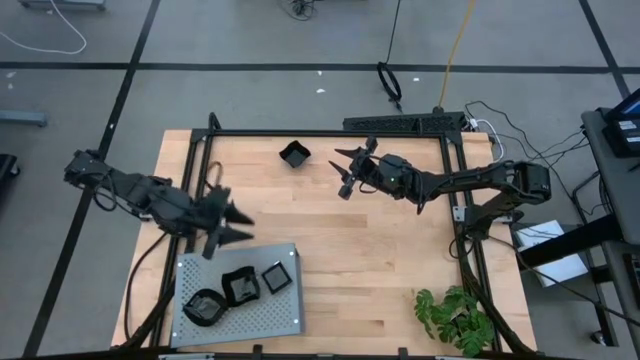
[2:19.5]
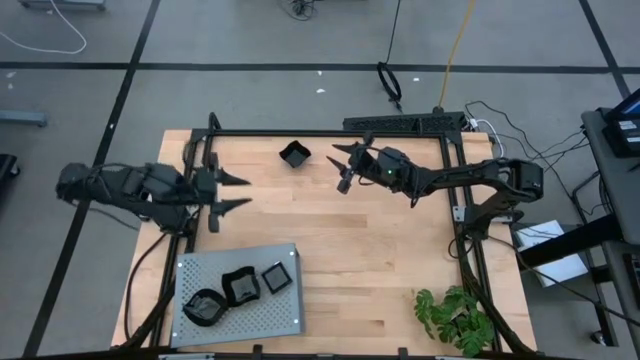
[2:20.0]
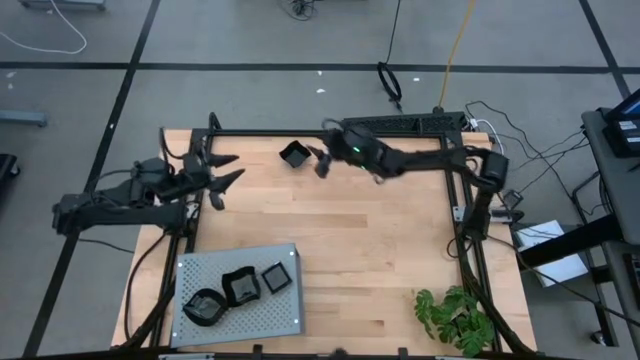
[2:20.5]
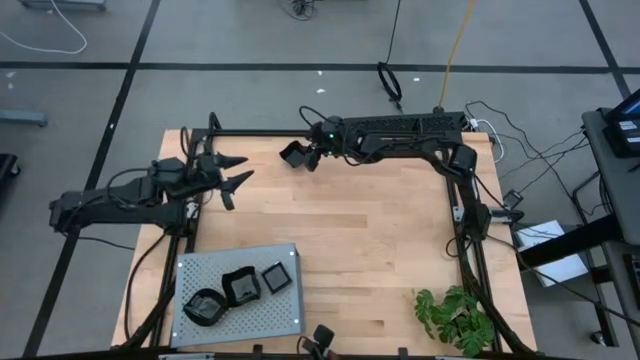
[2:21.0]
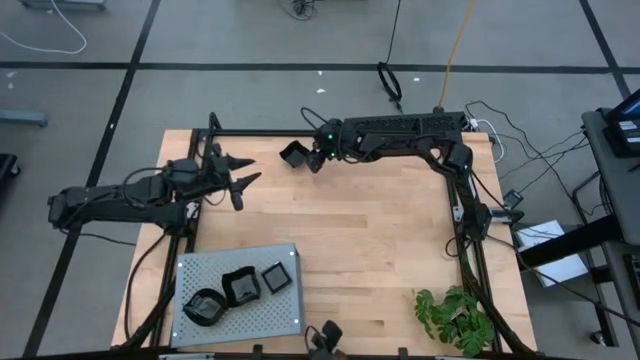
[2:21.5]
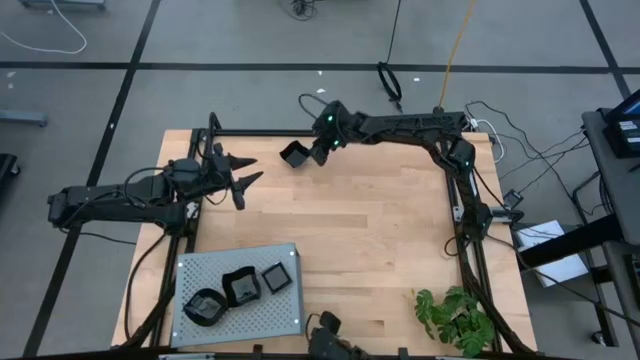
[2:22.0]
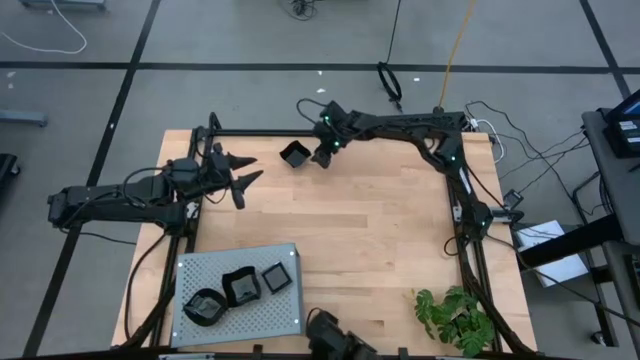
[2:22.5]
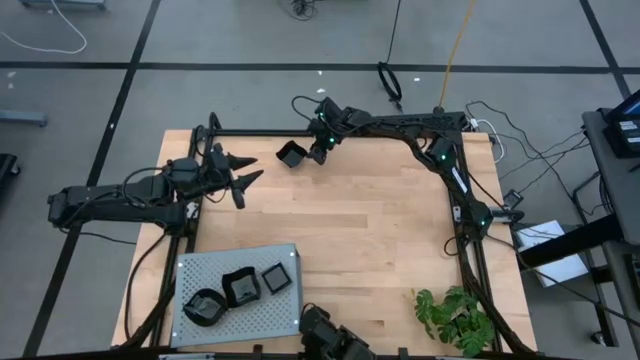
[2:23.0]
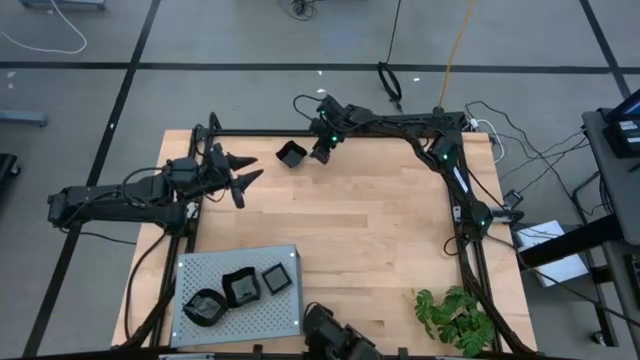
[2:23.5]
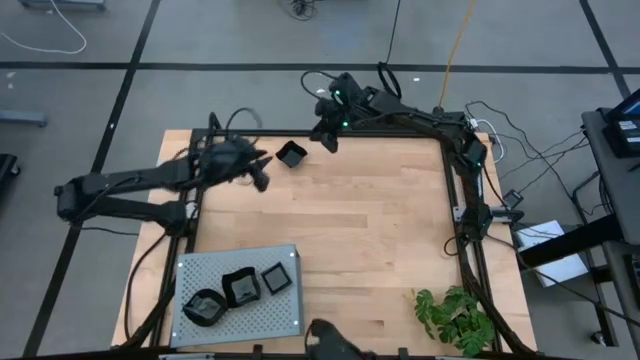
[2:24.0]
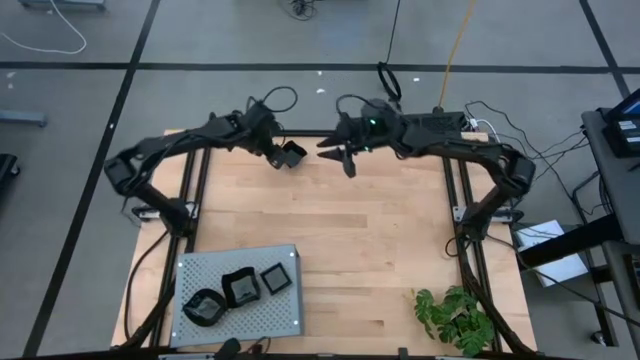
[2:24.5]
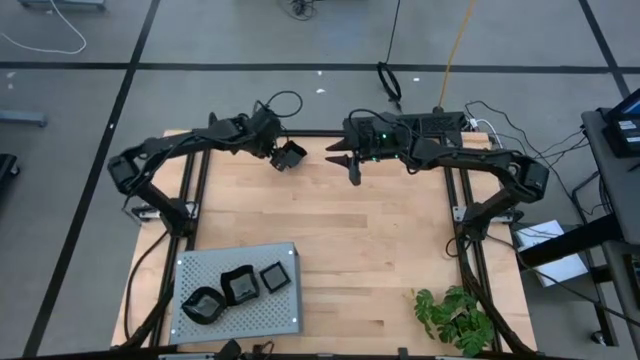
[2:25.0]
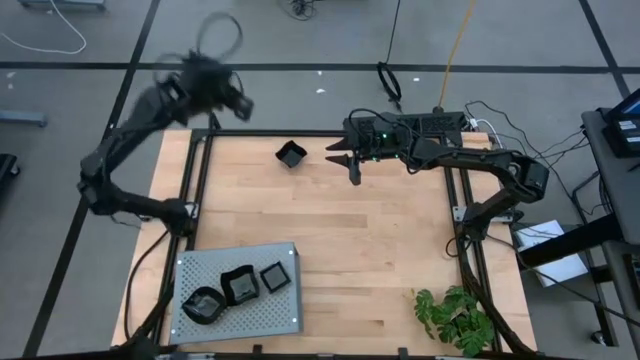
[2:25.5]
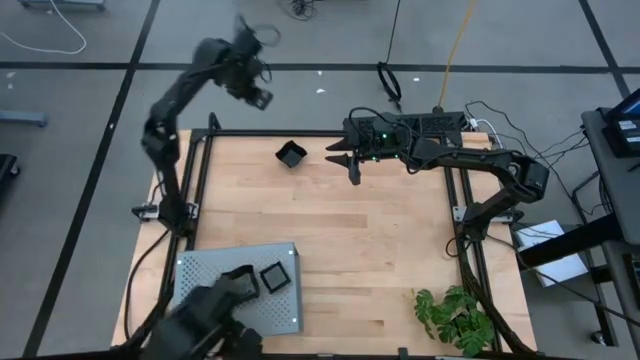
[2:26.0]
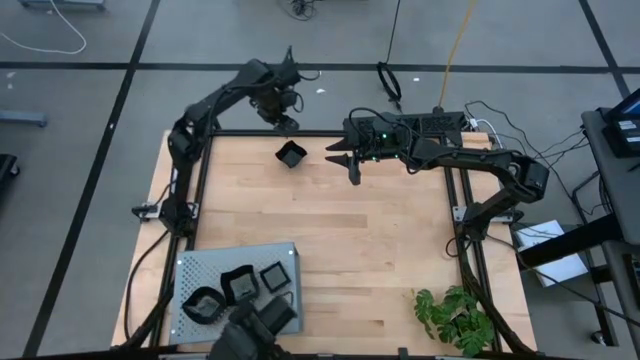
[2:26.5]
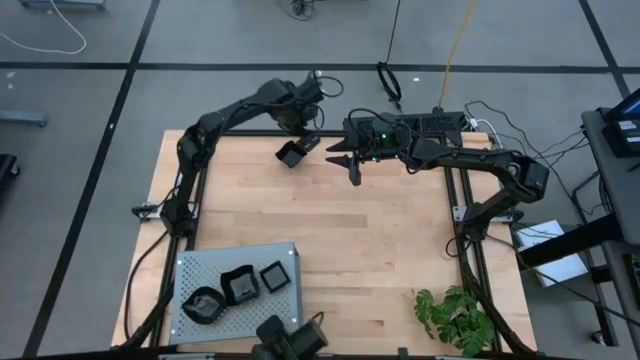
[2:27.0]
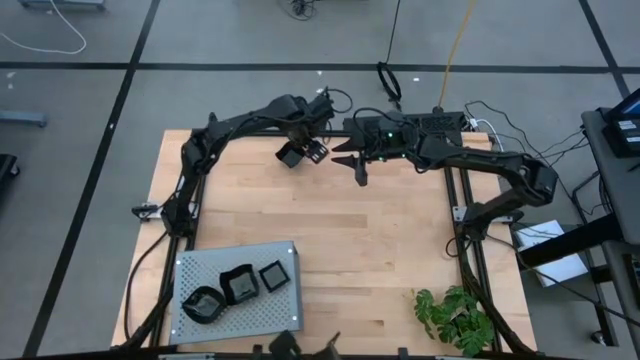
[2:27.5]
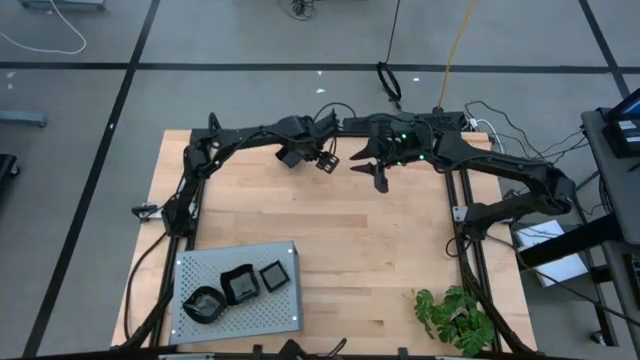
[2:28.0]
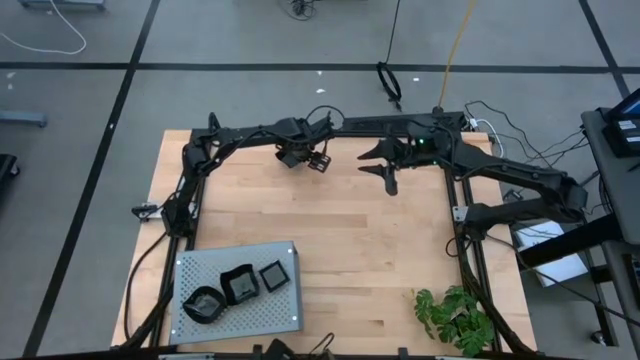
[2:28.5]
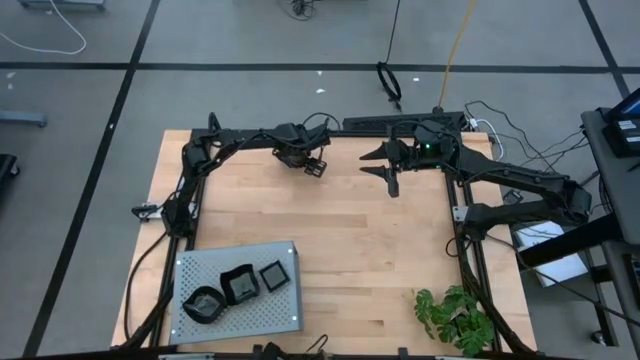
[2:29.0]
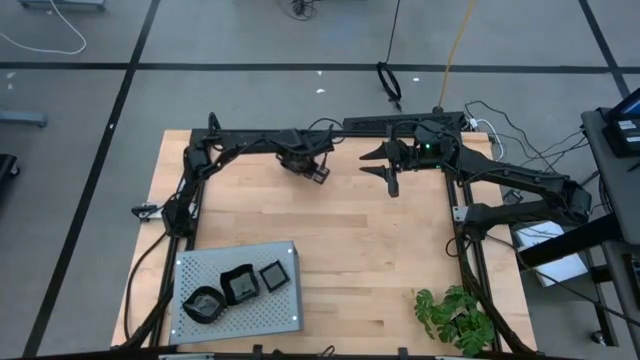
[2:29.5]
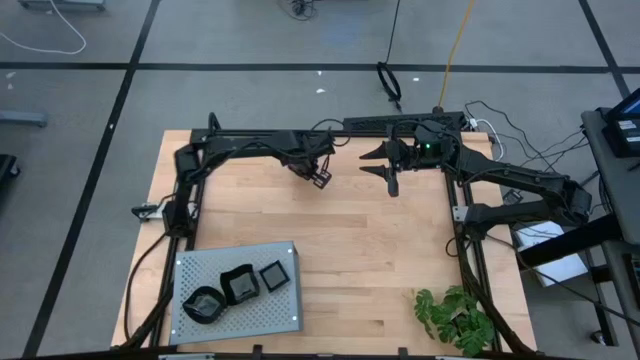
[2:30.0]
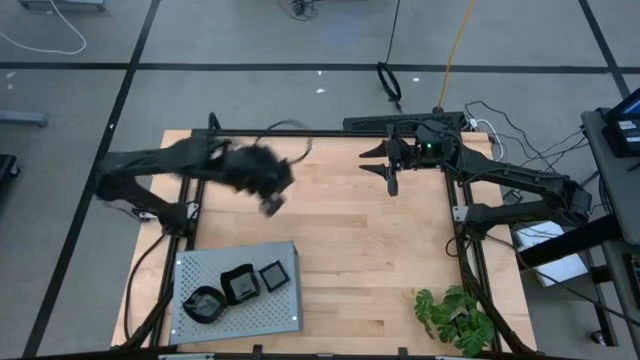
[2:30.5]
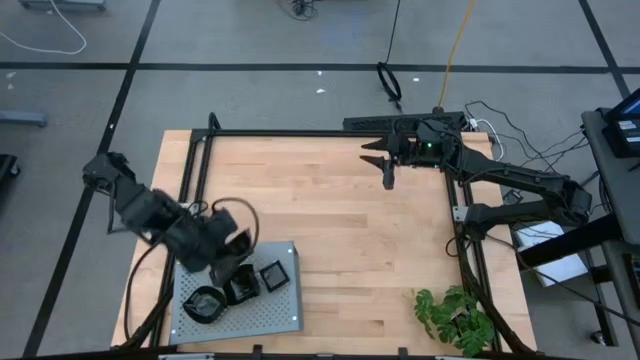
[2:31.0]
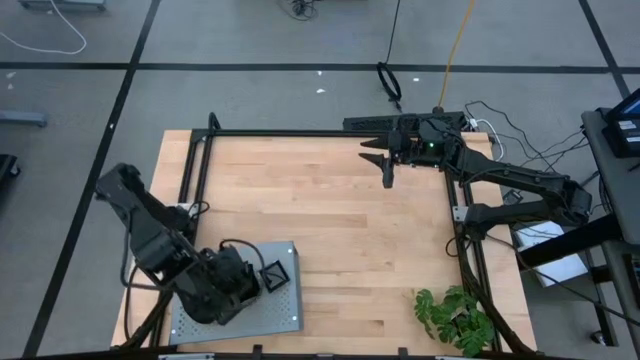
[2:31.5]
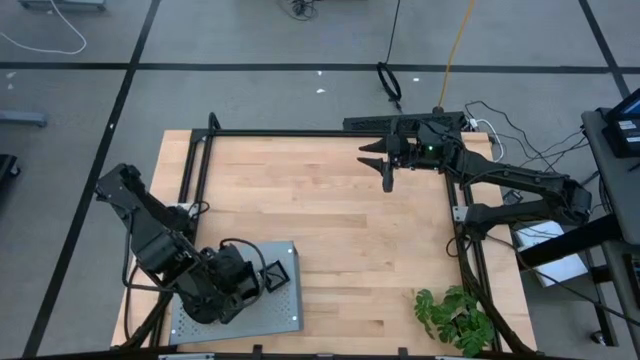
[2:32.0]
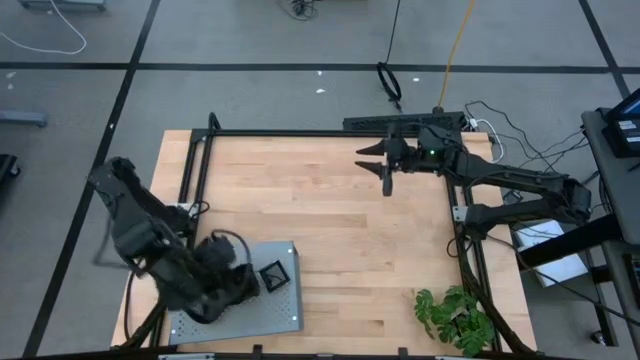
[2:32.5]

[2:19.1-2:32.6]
Task: Pick & Place Mini shaped plates
Stack the distorted square plate on top of the other distorted square plate on the shelf

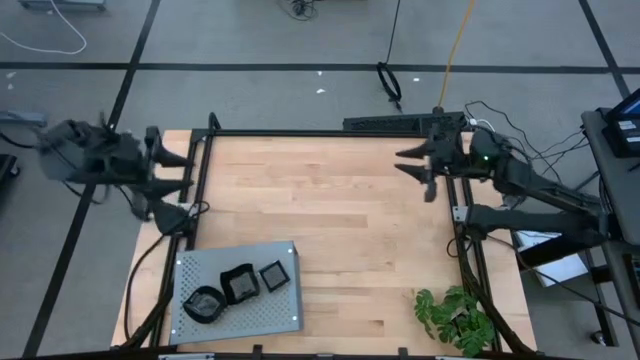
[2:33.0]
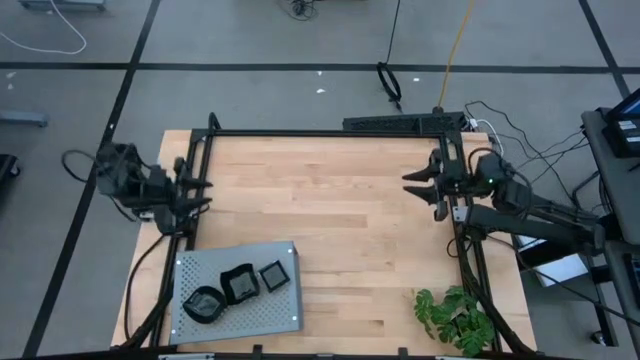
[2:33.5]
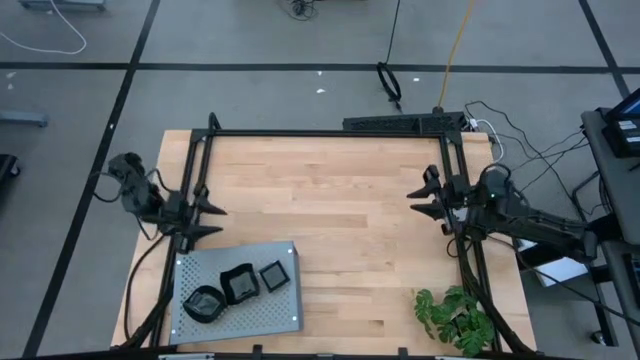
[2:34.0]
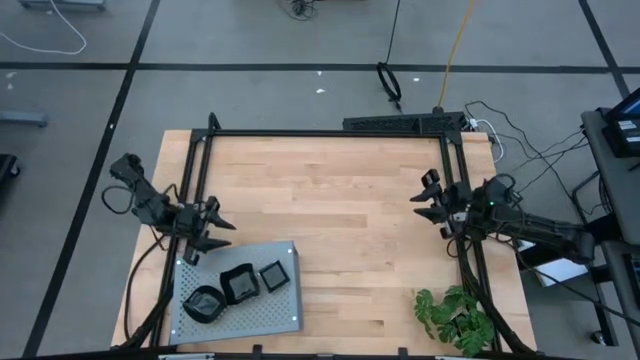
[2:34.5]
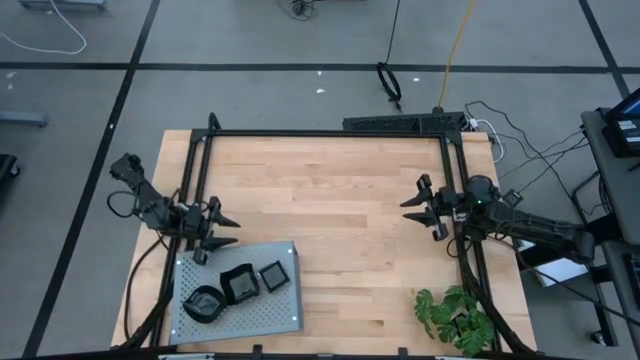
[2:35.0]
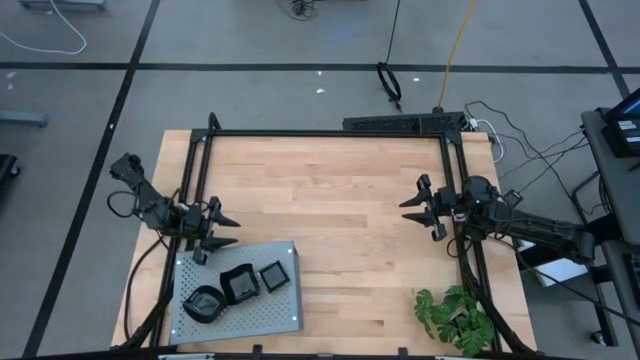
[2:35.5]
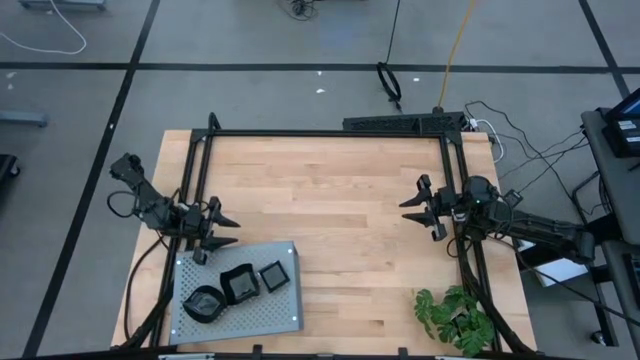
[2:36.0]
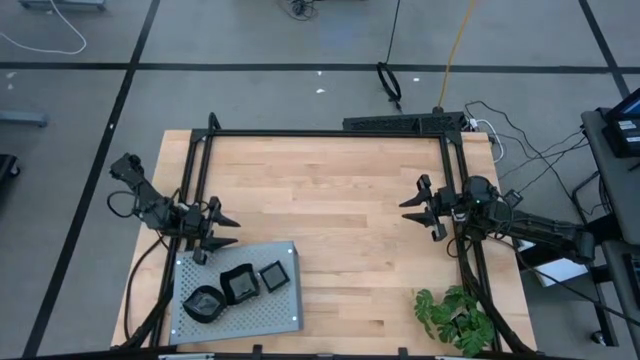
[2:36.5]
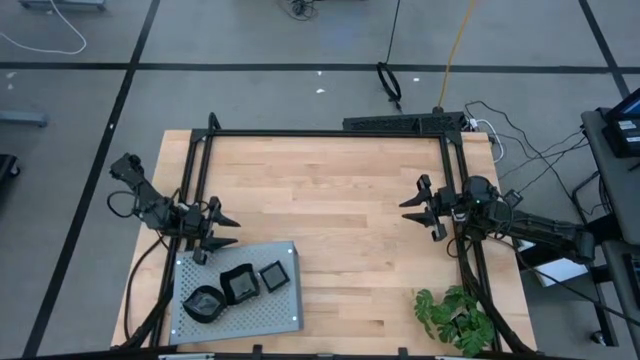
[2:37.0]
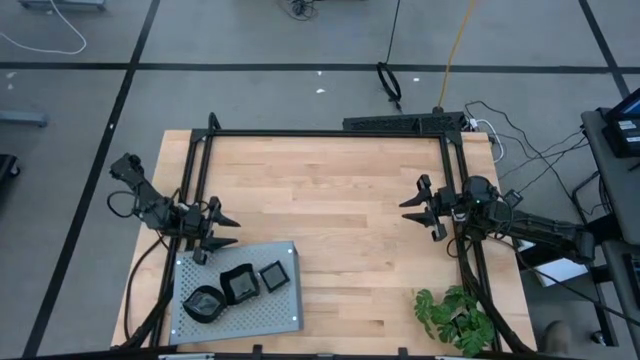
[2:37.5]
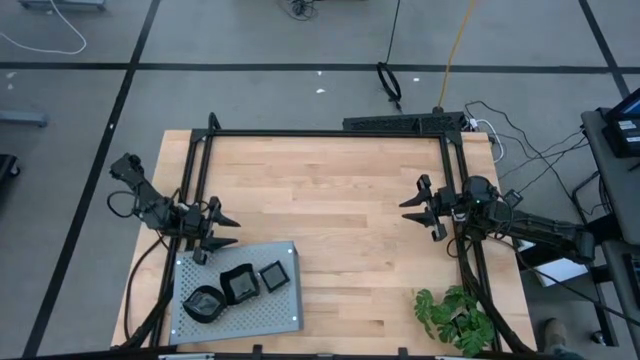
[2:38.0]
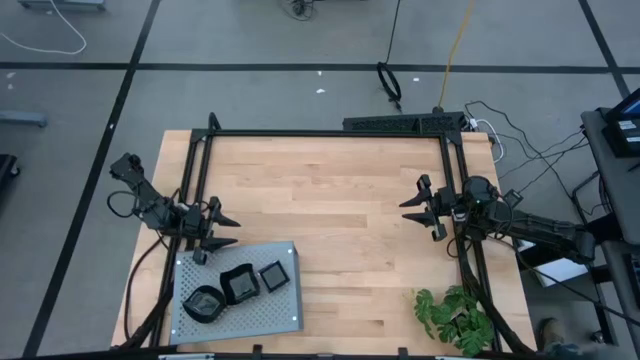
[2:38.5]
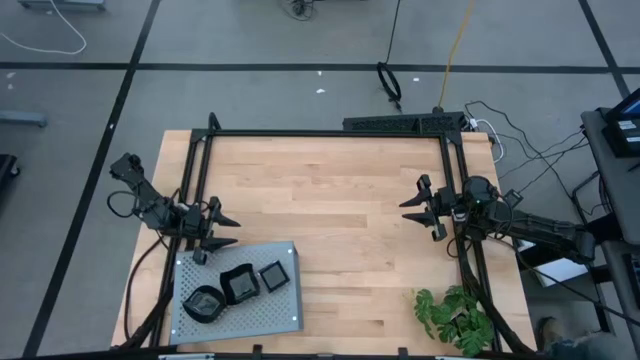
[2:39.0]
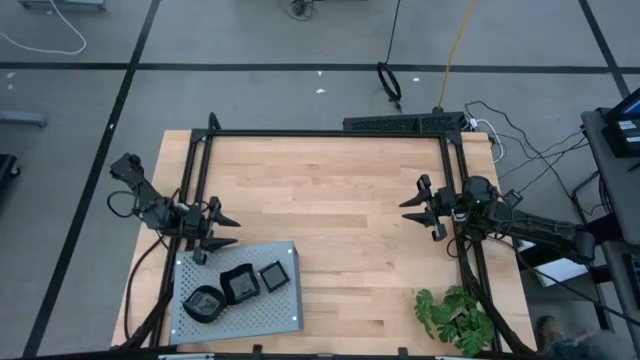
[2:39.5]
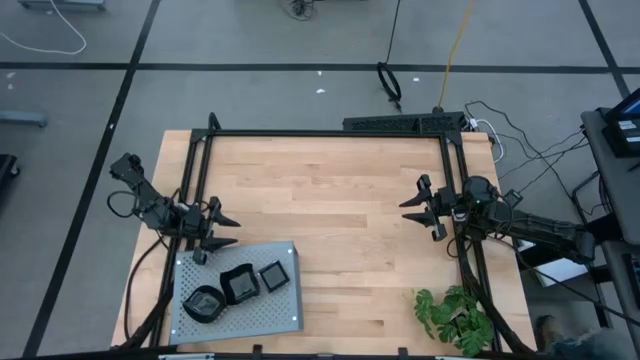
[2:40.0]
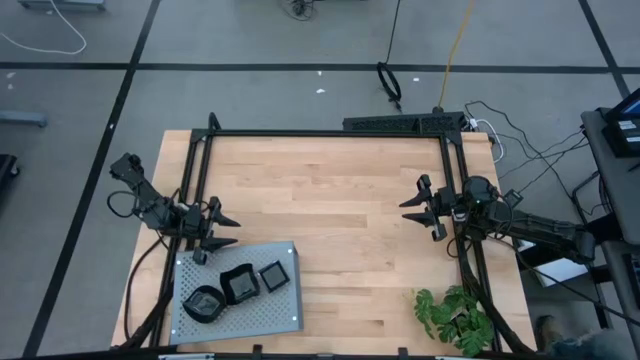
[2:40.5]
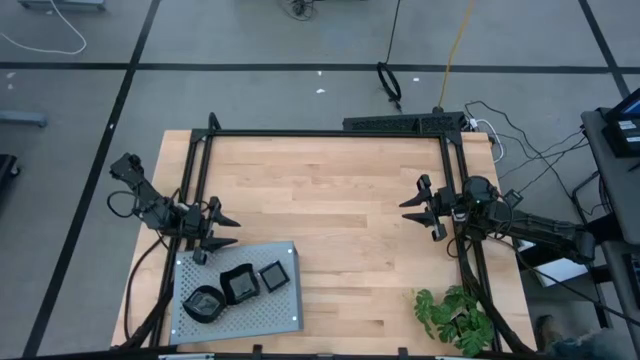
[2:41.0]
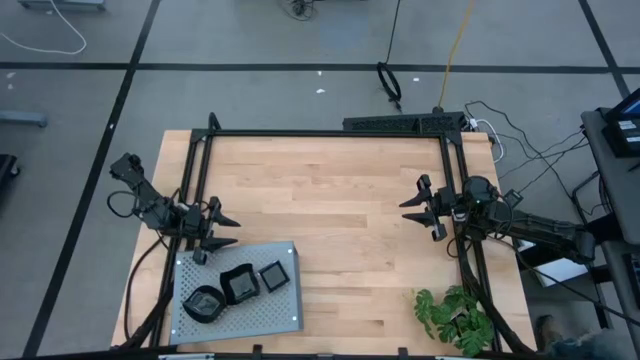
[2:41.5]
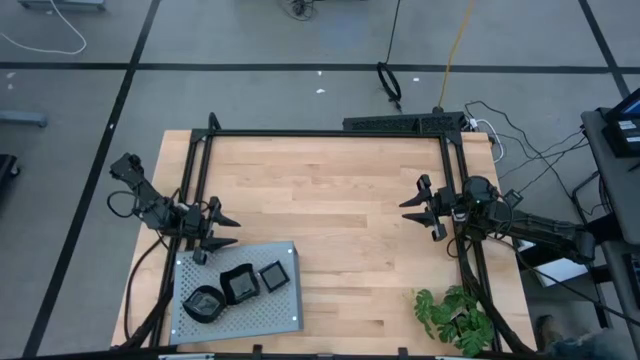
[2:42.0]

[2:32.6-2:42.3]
Return to Home Position
